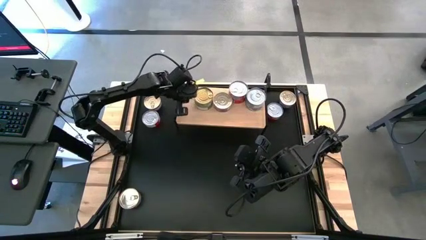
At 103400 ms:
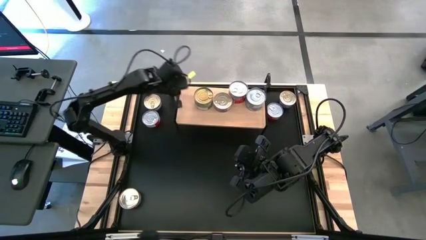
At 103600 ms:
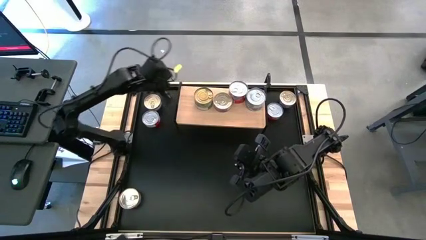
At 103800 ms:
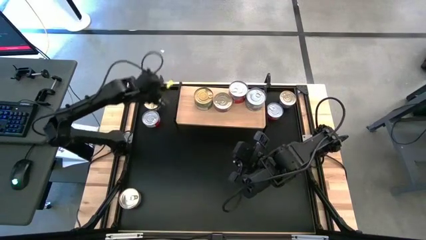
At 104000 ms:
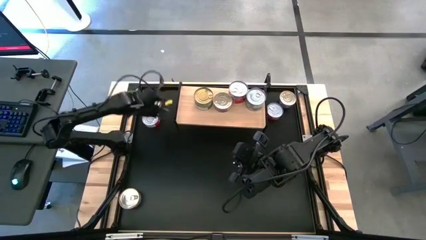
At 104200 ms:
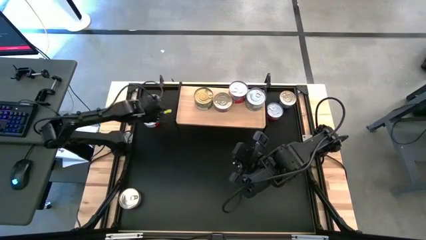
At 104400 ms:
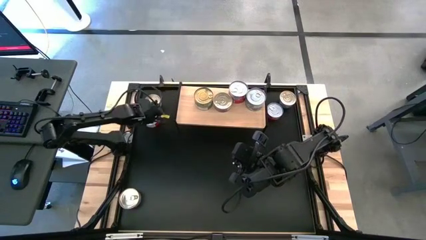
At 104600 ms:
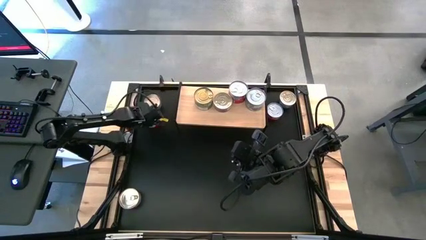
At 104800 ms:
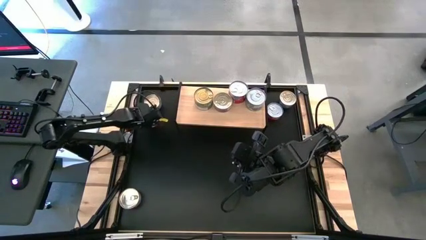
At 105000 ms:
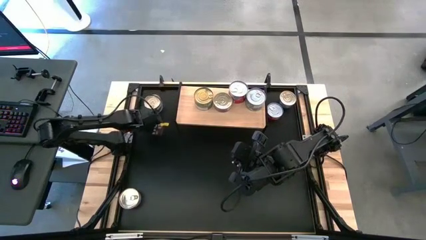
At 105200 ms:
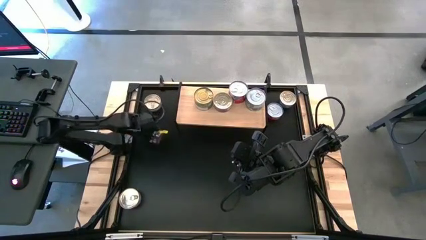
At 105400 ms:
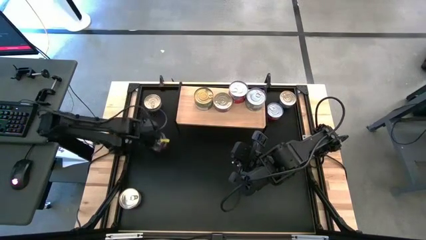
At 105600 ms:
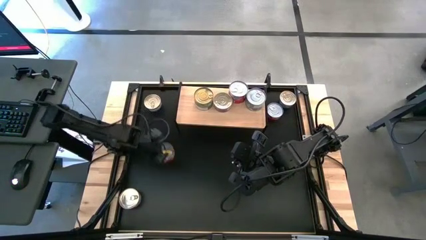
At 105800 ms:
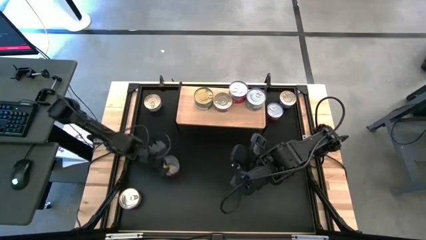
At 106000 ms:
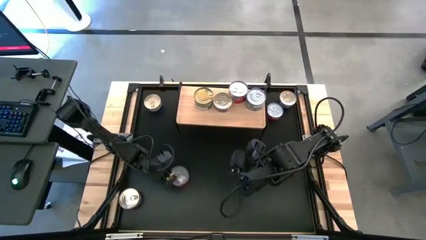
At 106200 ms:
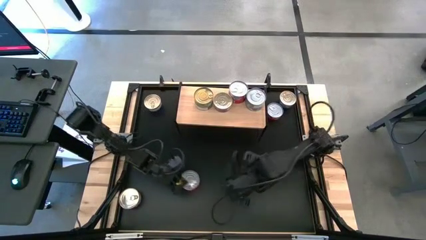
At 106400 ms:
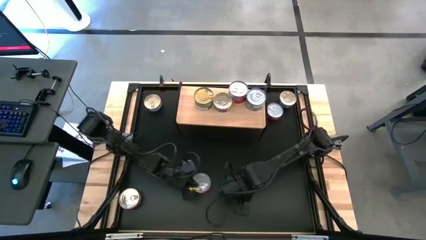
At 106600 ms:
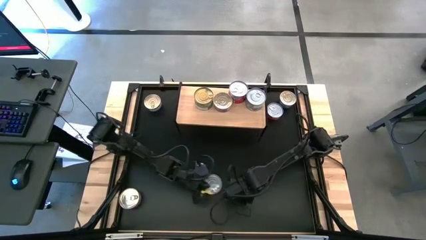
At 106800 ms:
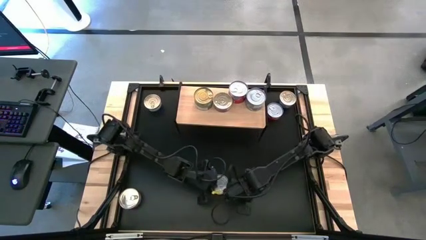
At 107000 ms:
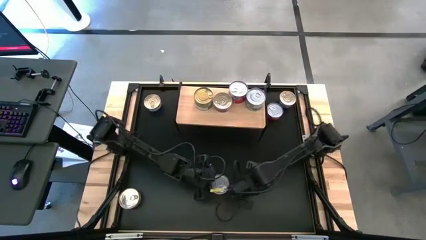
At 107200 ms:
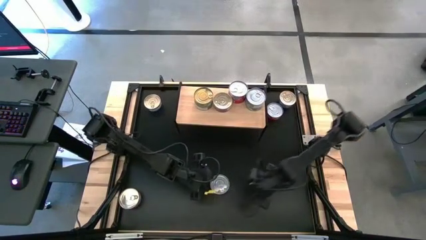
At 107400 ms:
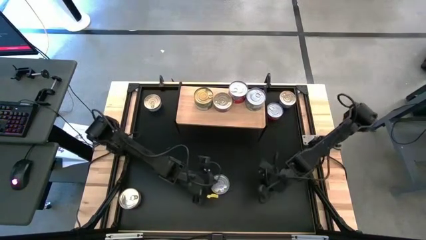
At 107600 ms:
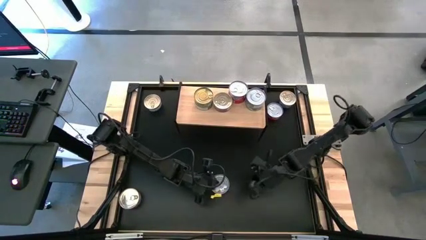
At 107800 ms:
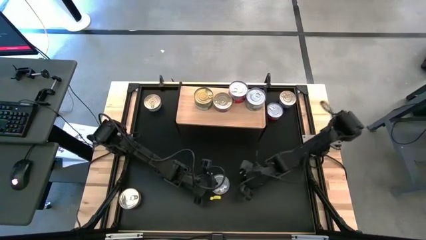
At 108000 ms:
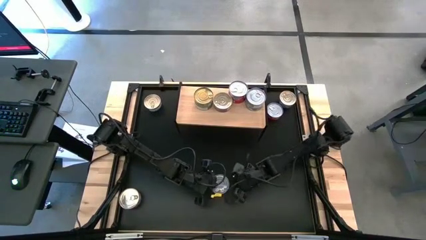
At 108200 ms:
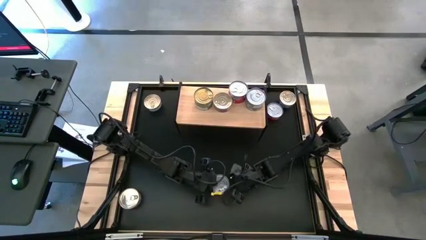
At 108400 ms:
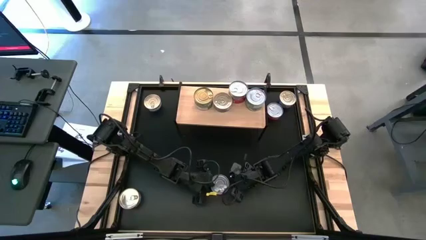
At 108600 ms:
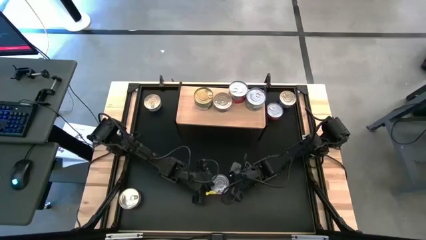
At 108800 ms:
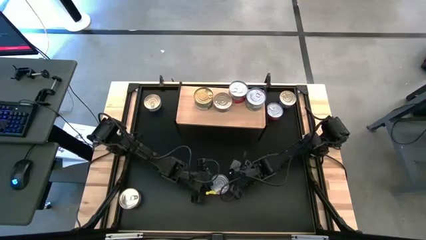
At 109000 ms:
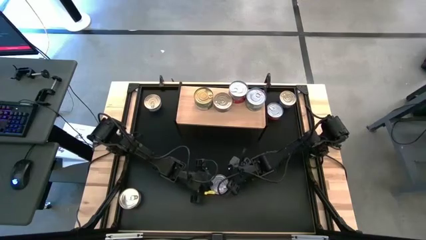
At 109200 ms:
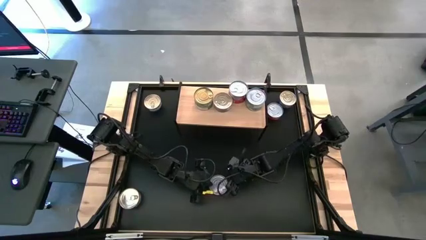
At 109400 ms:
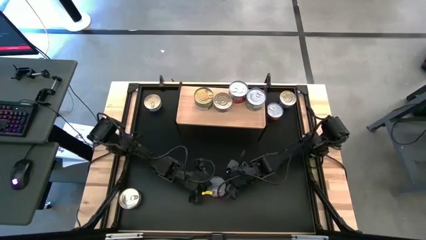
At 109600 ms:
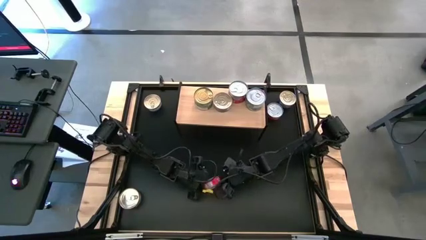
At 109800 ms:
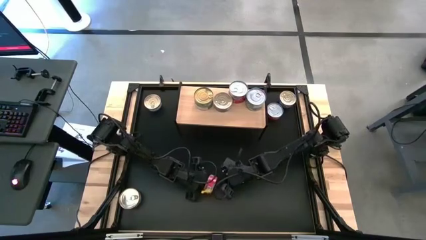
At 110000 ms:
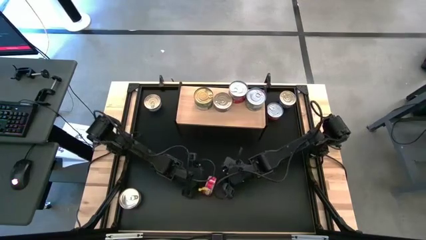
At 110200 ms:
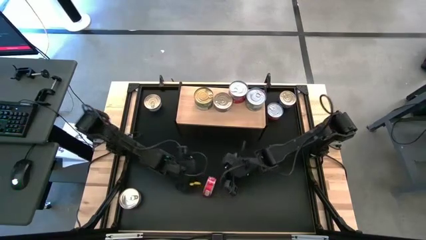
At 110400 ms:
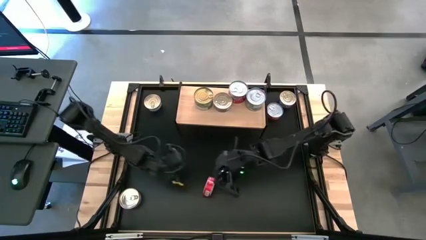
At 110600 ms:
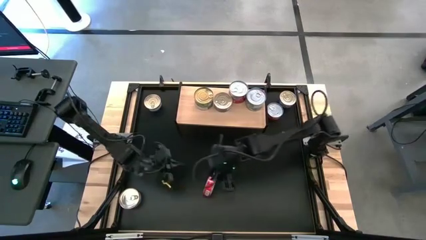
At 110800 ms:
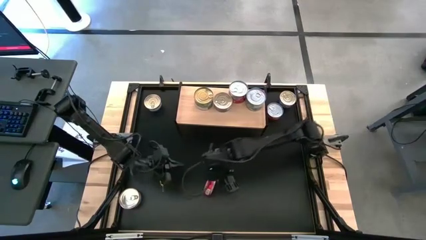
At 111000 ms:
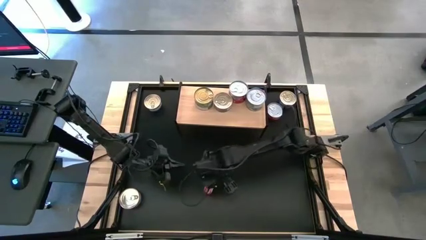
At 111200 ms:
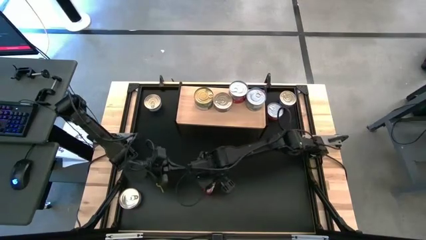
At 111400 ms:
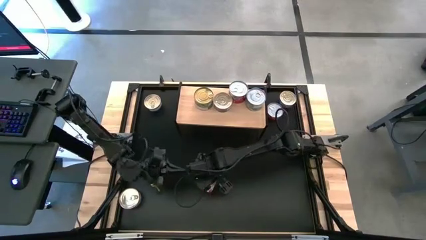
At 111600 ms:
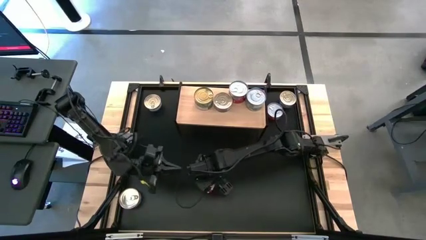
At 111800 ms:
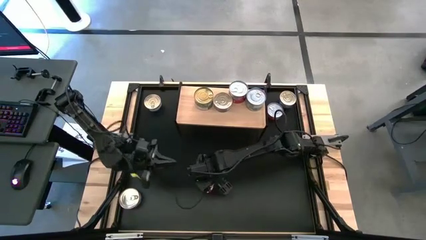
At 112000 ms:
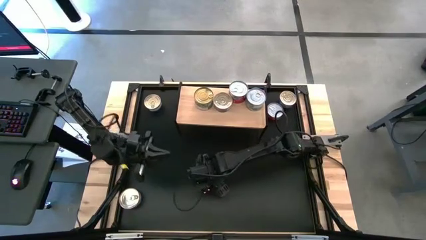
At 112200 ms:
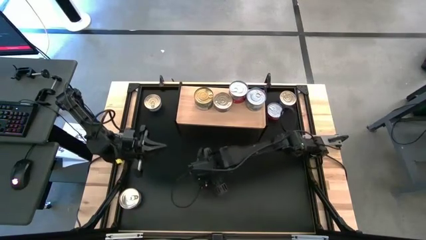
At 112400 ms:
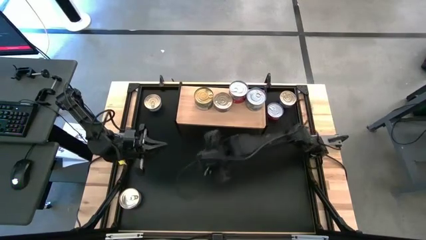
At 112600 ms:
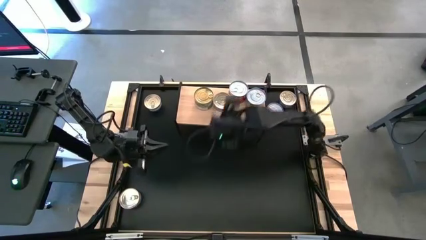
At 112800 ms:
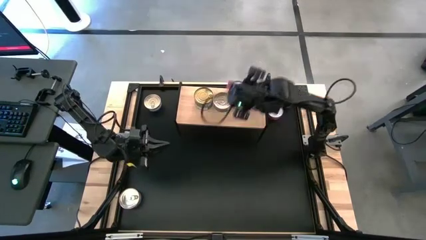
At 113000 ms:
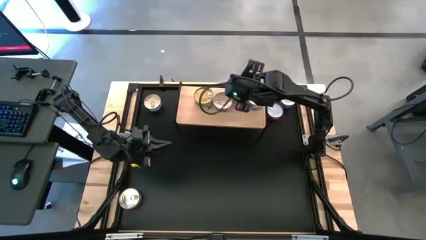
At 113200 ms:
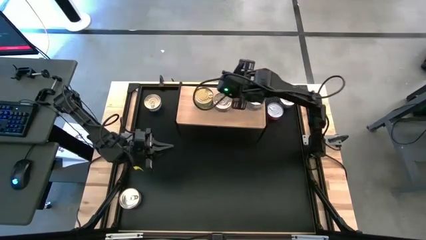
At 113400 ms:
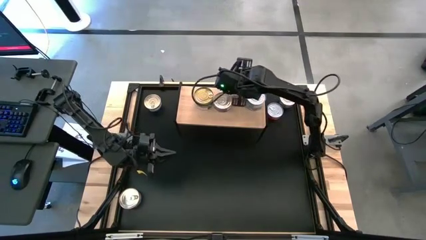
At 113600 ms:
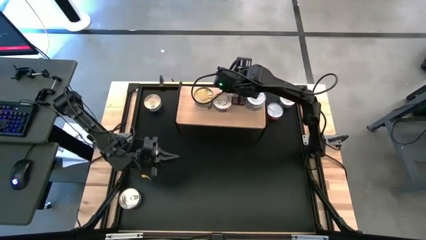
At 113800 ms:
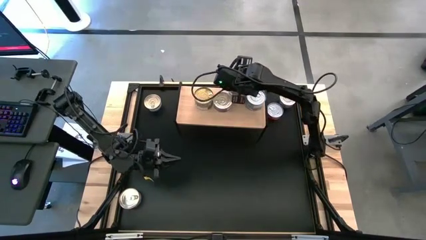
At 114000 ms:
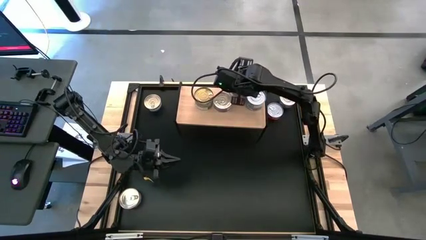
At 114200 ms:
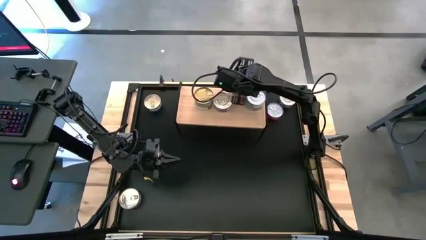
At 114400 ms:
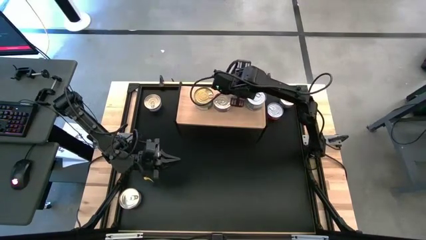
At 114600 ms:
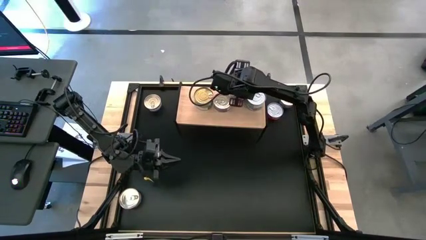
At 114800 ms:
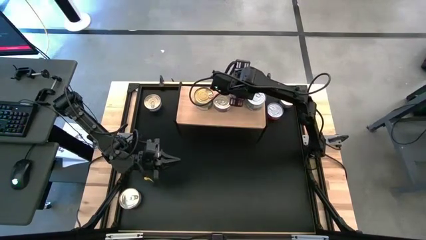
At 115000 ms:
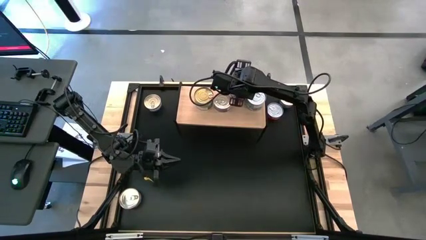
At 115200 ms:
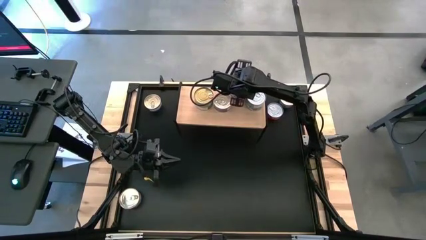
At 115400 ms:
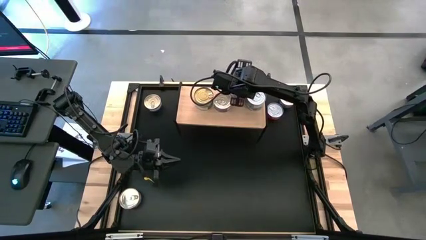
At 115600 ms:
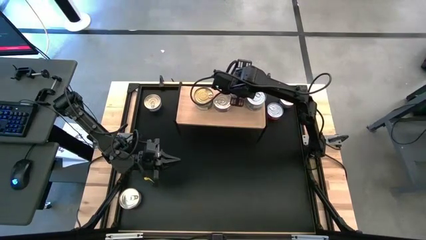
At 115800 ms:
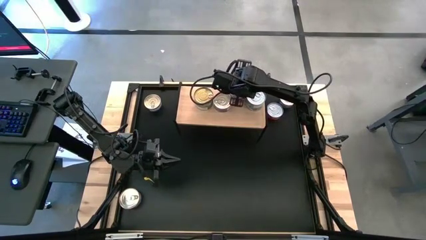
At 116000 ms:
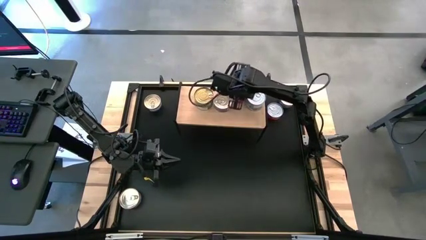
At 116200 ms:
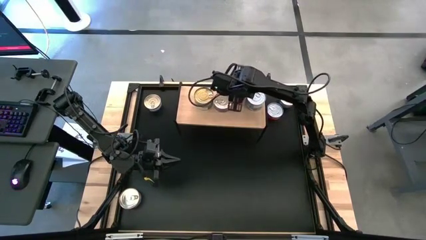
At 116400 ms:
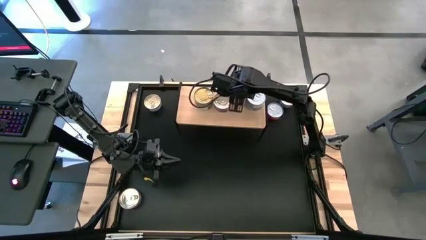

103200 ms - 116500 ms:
Task: Stack canned seafood by type on shelf
Stack the red tuna can on top of the red tuna can on the shelf
